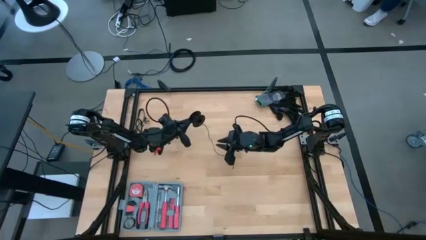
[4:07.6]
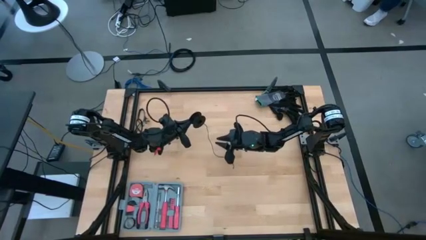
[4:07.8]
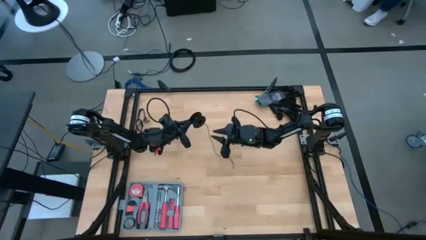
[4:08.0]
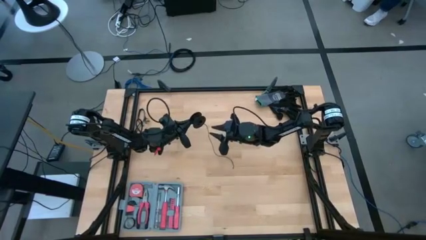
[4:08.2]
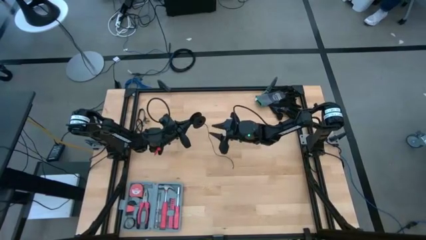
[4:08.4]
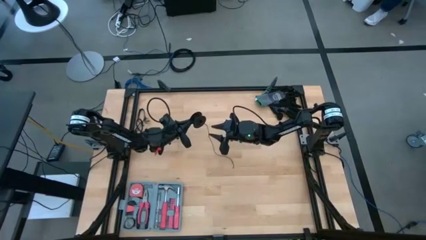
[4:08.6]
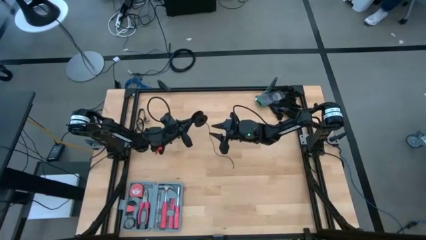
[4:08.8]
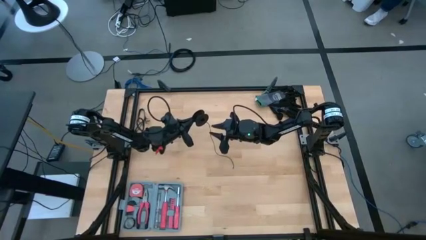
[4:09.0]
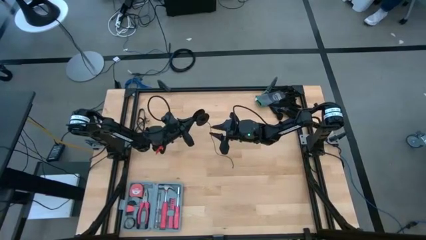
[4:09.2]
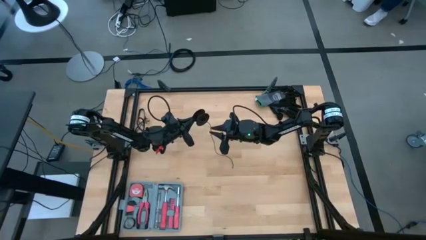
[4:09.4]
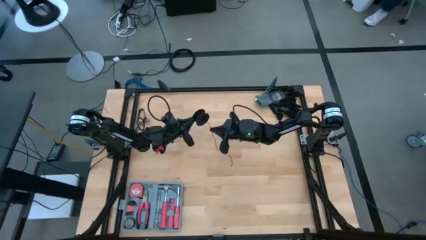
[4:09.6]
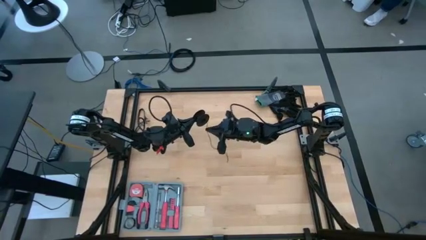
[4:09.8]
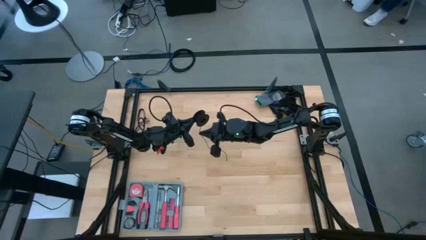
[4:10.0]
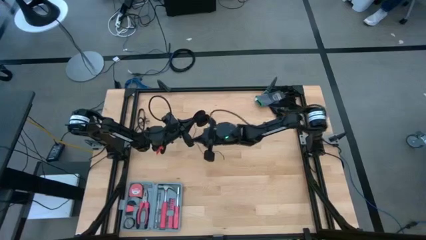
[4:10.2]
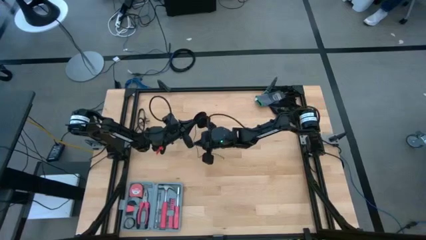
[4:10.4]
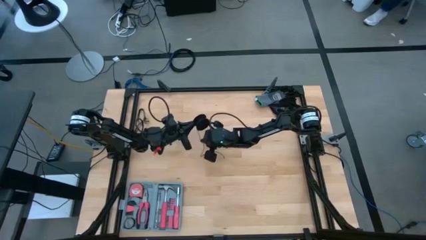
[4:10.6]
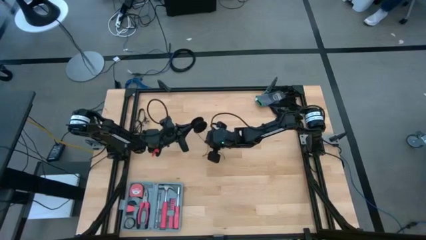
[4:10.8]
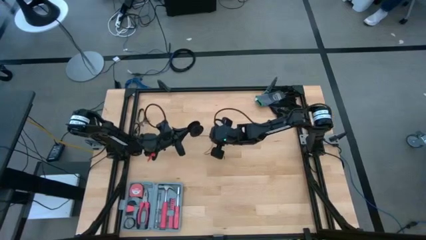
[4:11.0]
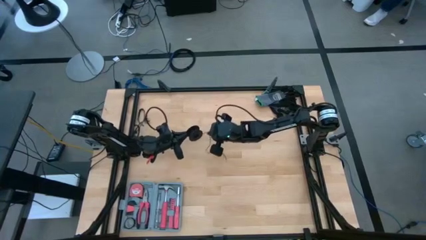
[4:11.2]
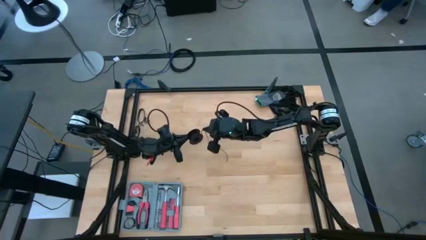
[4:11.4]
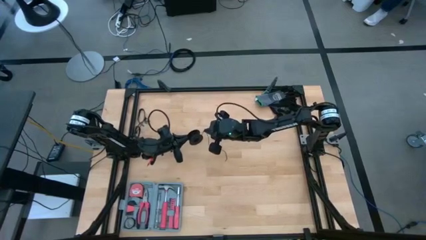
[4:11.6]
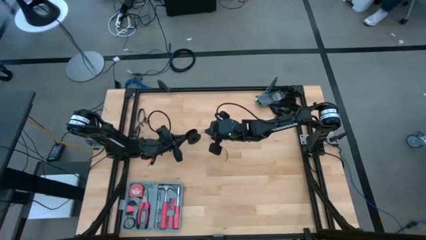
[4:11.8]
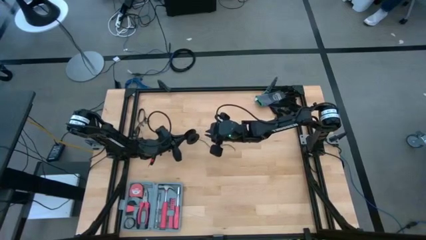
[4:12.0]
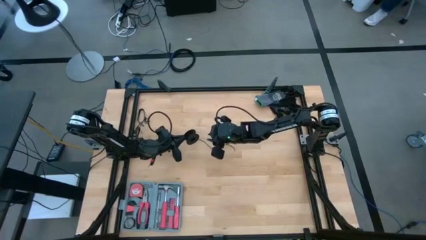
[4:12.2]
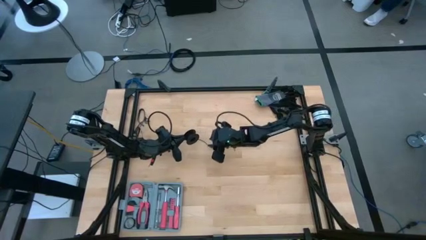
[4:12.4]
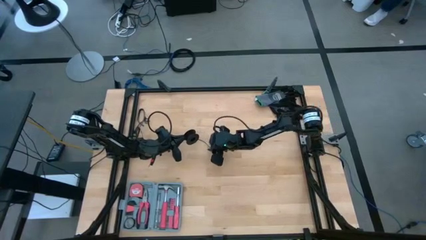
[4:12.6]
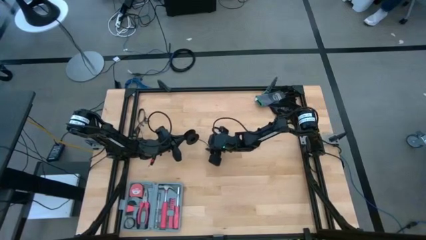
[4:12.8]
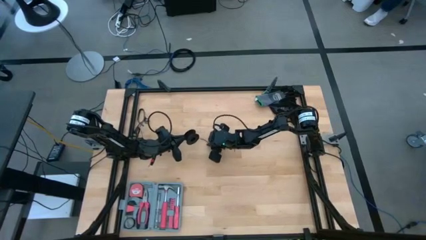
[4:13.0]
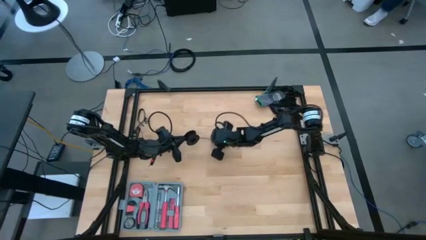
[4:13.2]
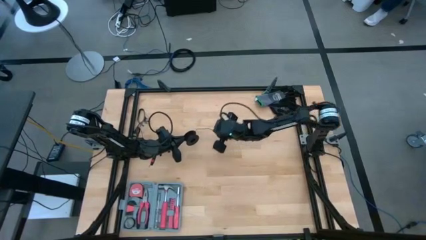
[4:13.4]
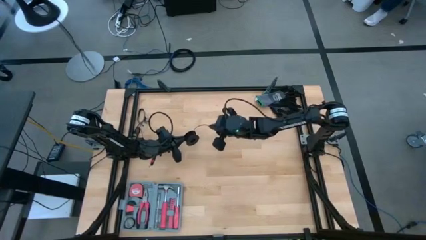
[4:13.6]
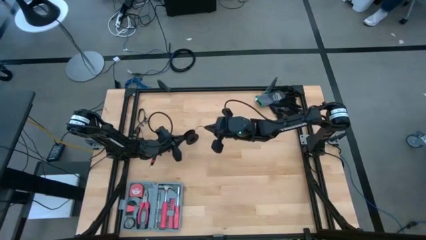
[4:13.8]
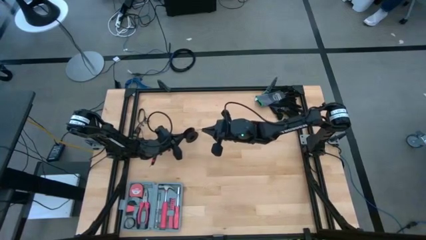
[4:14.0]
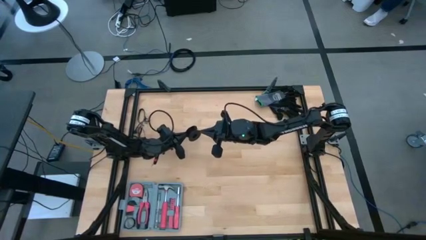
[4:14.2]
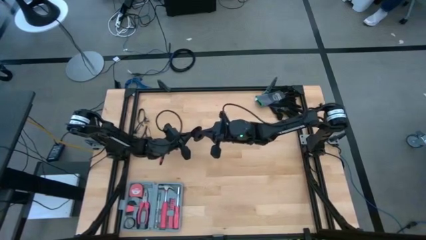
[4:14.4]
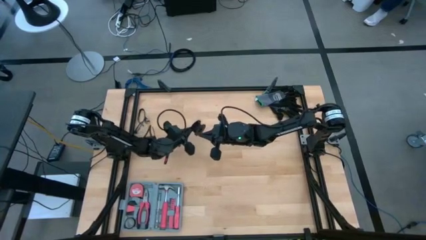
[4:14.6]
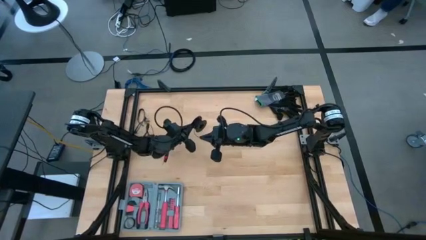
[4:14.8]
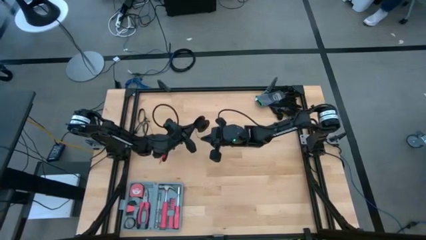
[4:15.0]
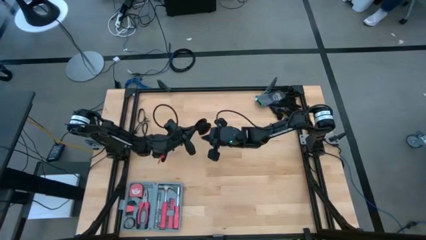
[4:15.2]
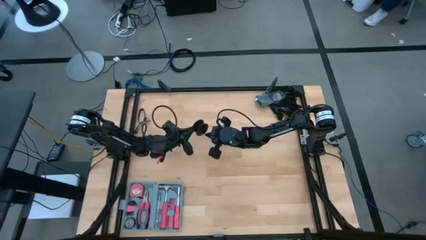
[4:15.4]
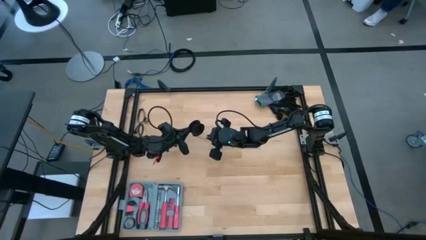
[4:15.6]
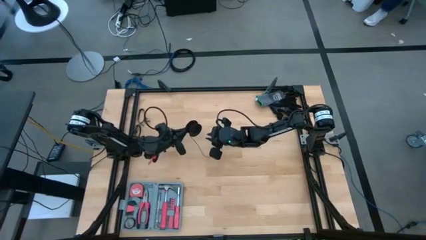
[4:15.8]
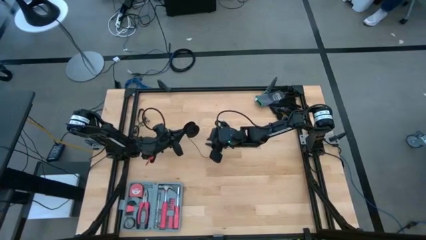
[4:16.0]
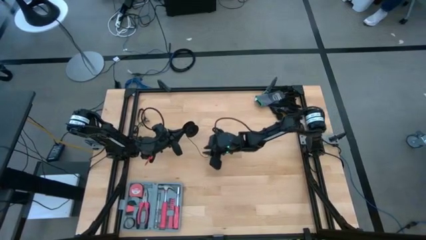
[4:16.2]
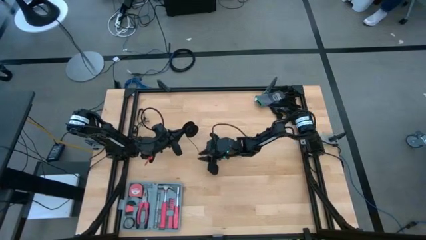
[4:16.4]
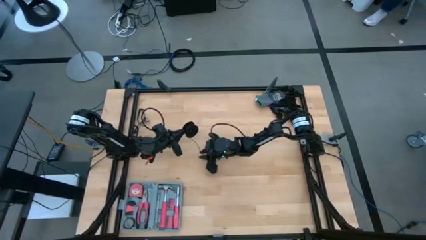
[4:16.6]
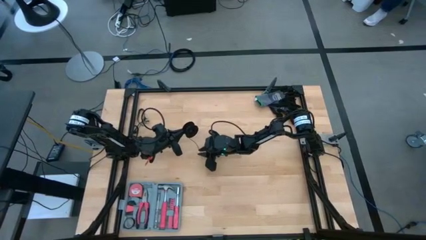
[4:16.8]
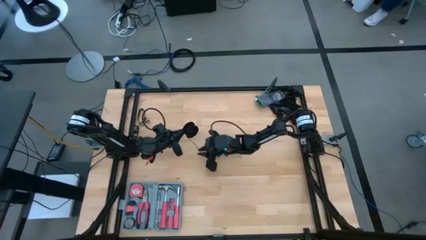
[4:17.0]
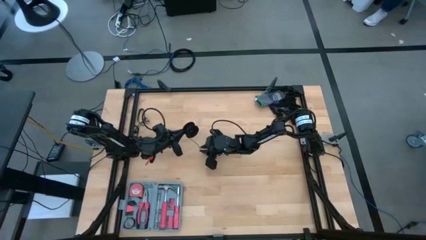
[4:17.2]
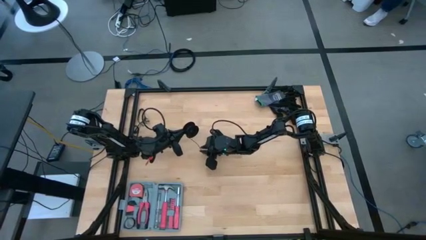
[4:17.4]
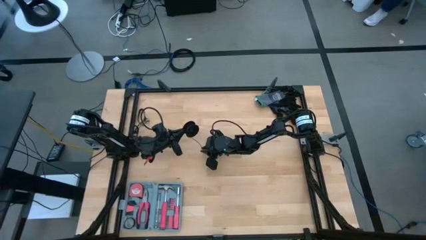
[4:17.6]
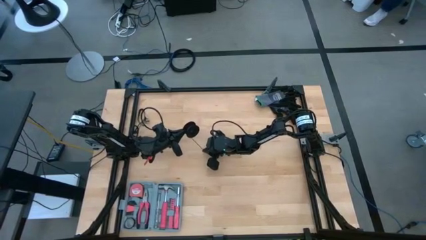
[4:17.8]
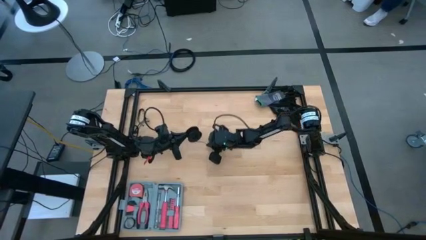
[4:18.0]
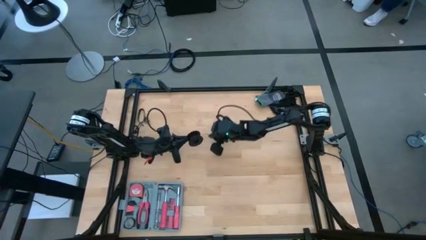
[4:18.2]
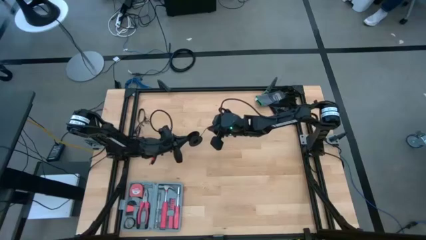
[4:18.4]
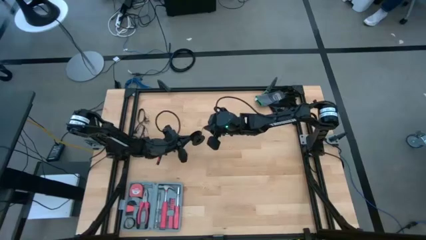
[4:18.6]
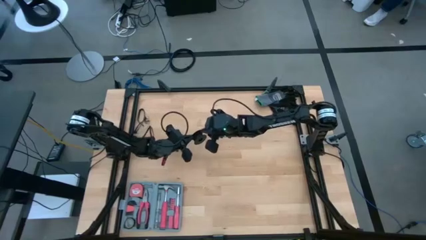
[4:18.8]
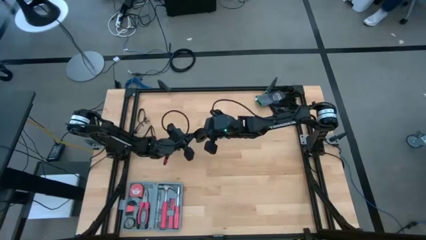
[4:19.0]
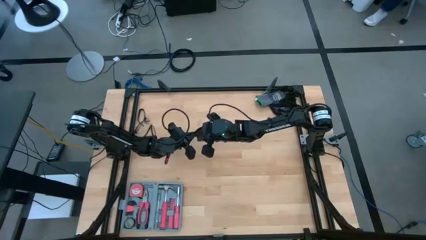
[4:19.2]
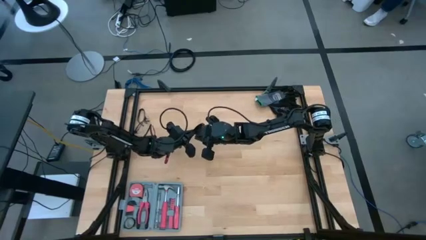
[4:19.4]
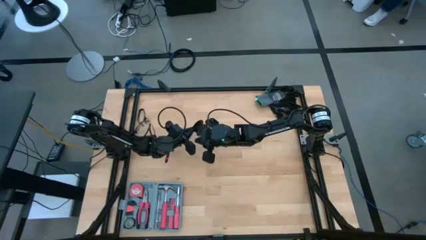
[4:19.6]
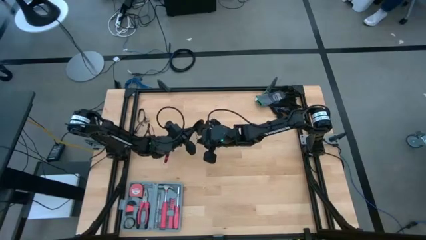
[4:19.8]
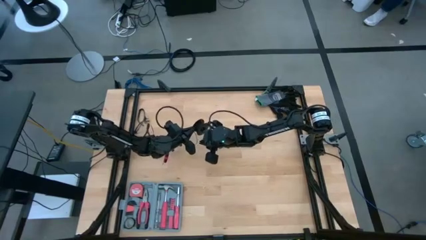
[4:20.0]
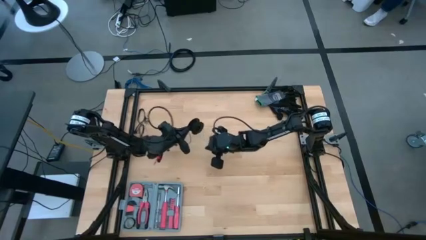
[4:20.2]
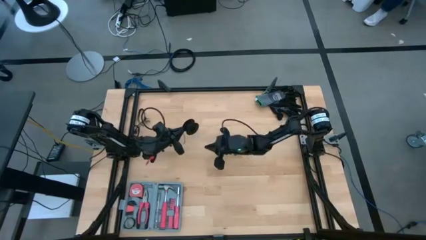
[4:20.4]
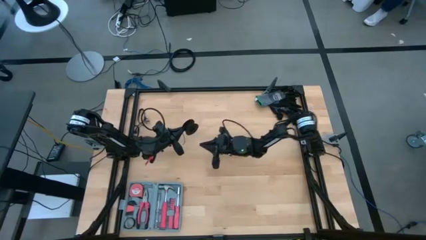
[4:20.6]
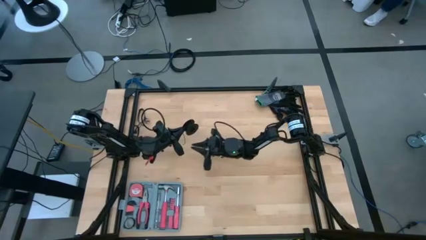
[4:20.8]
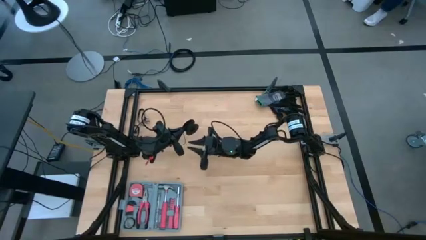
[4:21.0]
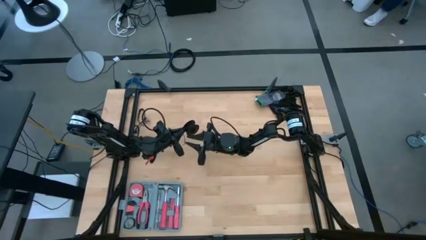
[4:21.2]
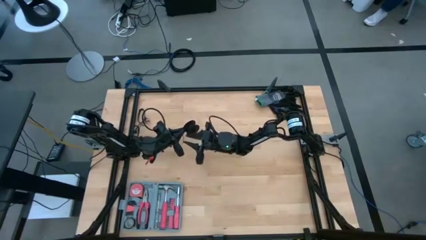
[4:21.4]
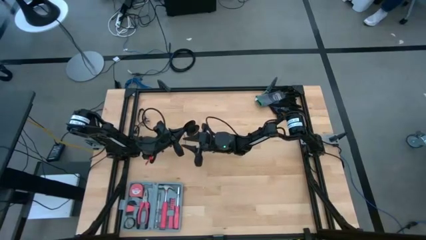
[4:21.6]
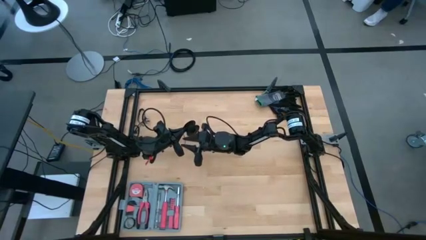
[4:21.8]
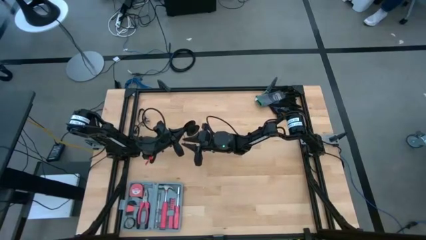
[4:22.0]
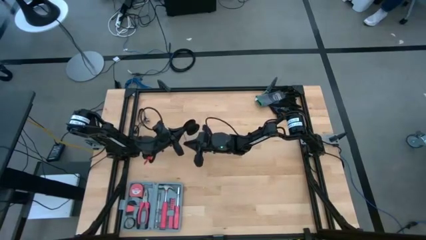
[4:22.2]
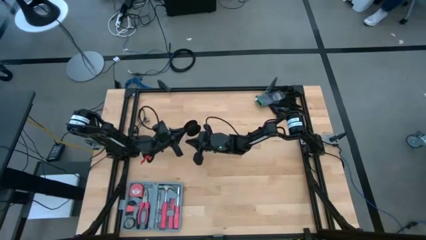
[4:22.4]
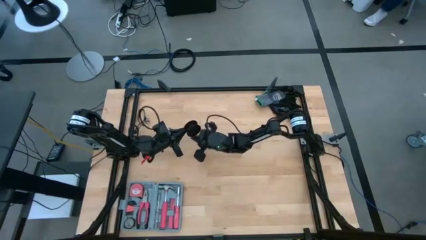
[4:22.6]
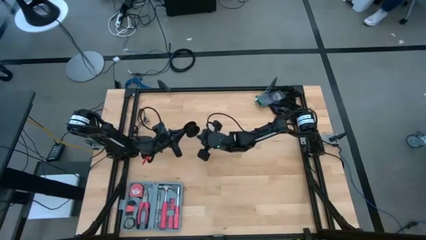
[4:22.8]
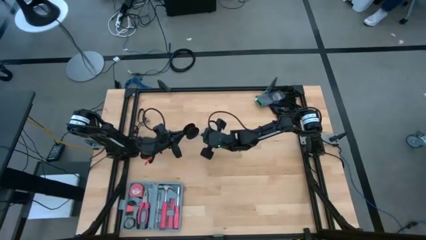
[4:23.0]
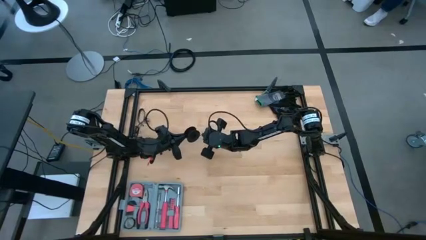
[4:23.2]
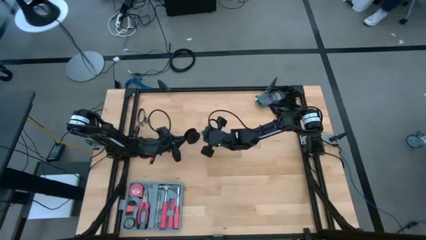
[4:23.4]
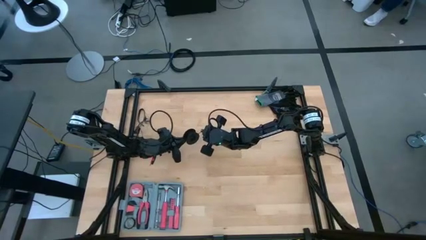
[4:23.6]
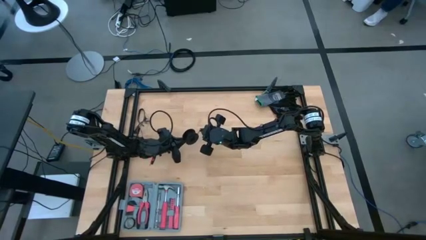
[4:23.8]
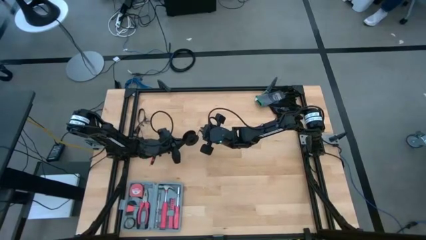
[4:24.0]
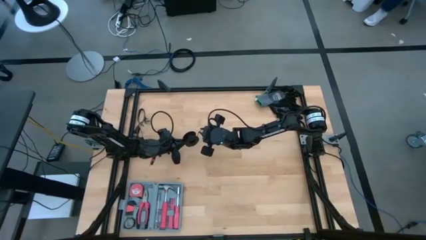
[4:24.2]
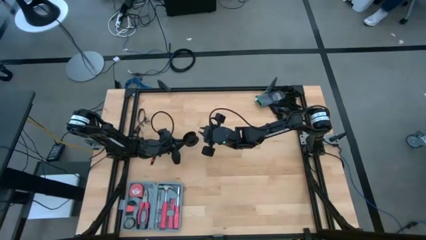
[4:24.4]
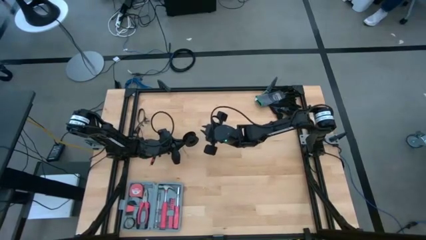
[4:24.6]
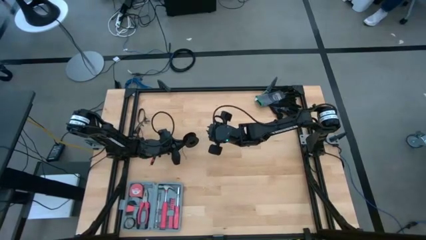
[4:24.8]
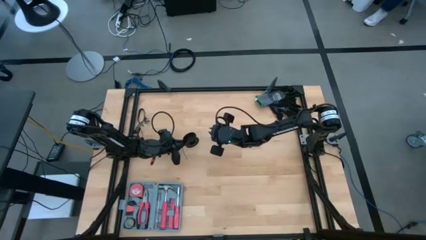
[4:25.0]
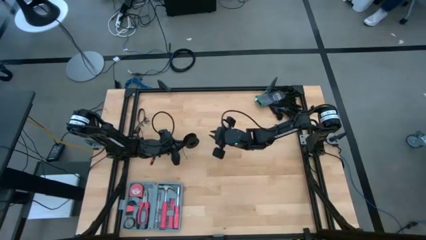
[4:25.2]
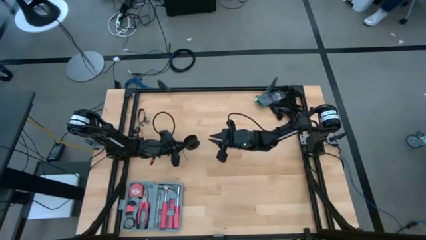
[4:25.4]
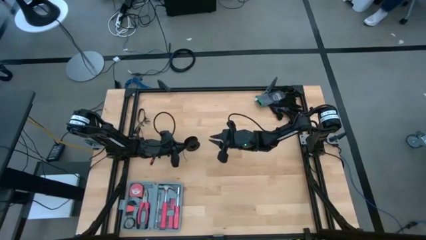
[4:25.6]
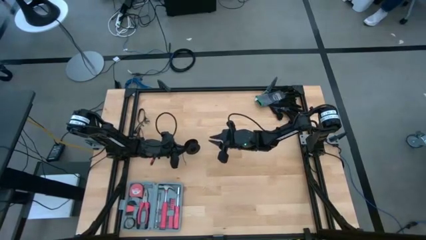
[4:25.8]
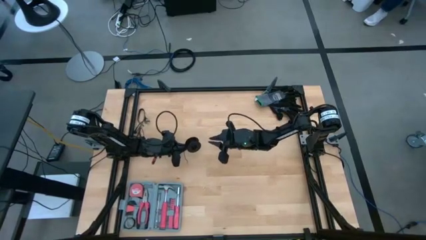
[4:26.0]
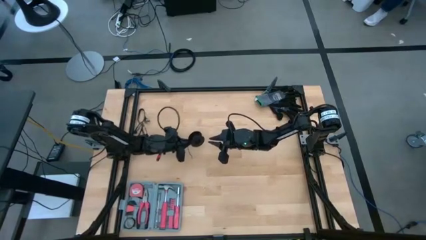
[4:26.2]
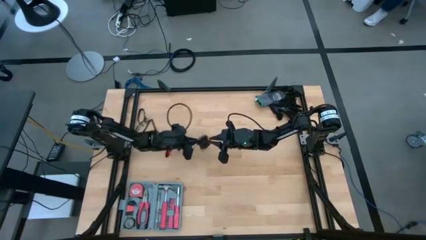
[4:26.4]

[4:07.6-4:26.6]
Task: Coil cords
Coil the black wire on the spool
